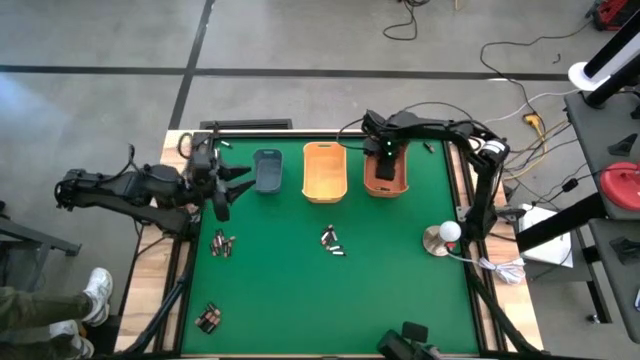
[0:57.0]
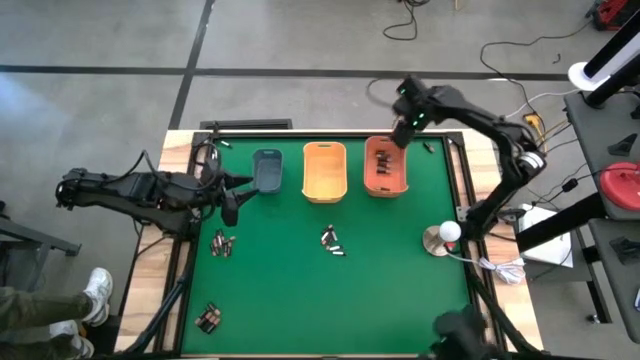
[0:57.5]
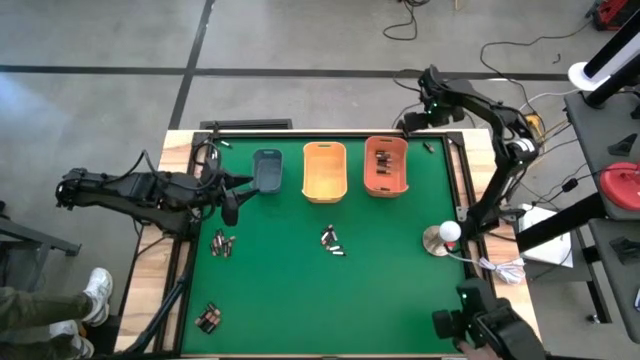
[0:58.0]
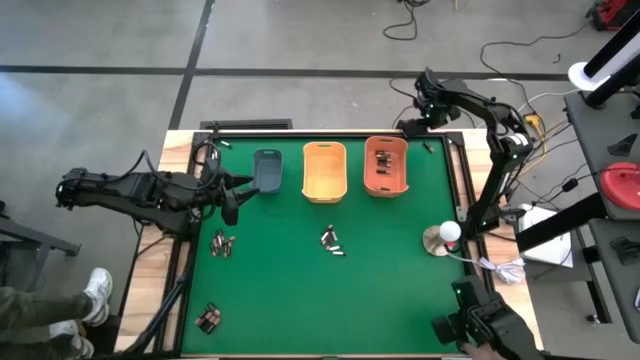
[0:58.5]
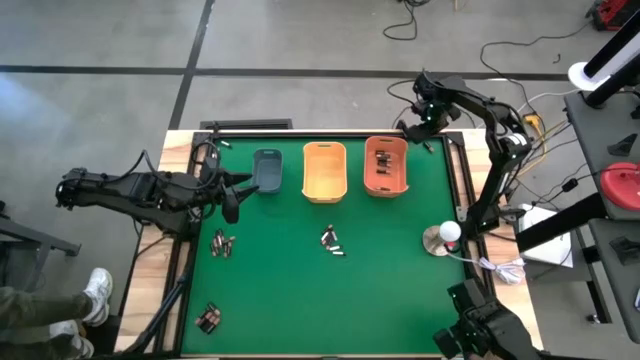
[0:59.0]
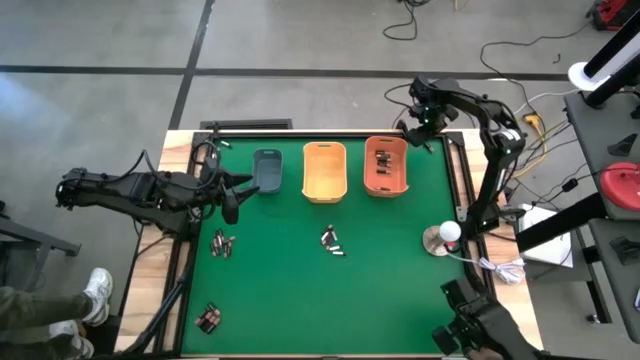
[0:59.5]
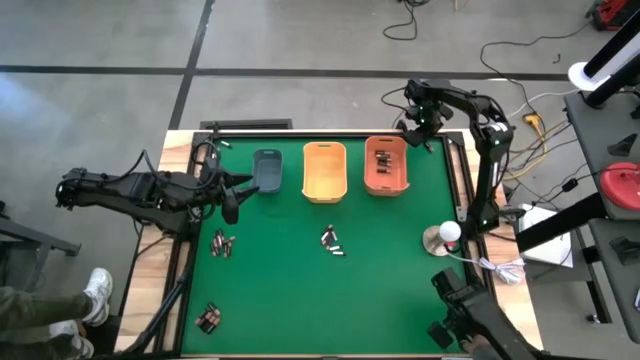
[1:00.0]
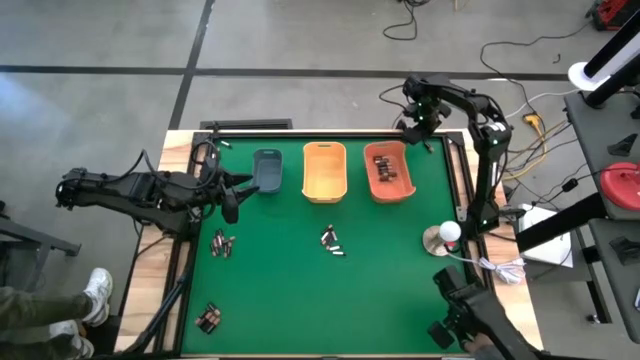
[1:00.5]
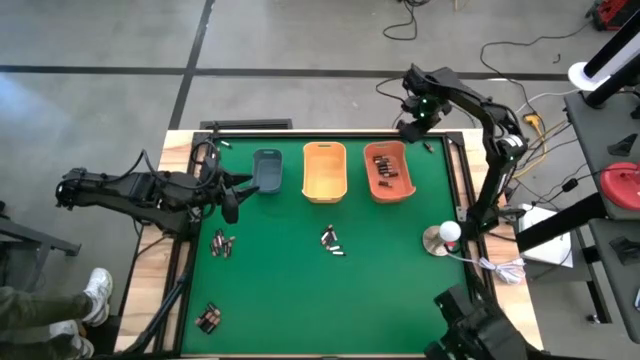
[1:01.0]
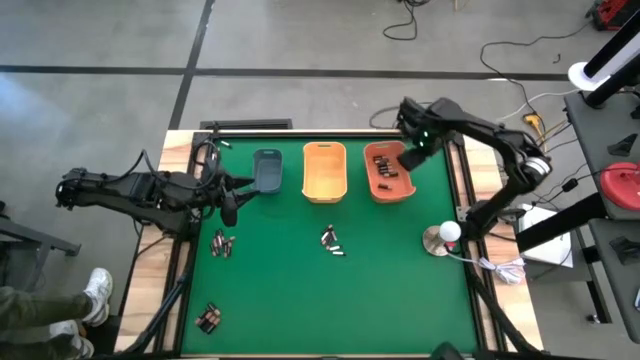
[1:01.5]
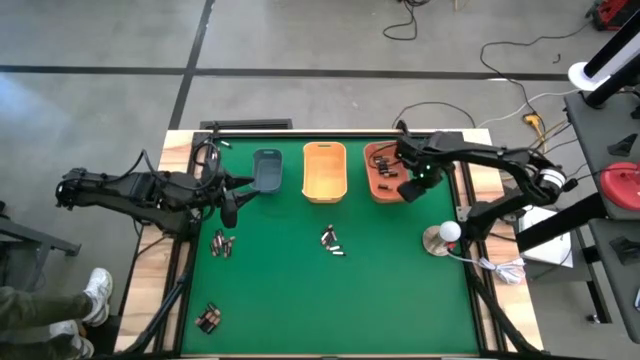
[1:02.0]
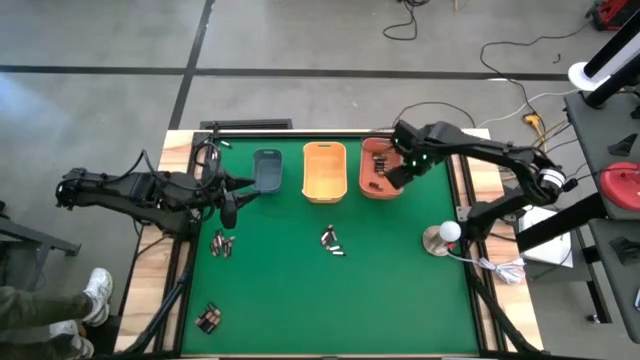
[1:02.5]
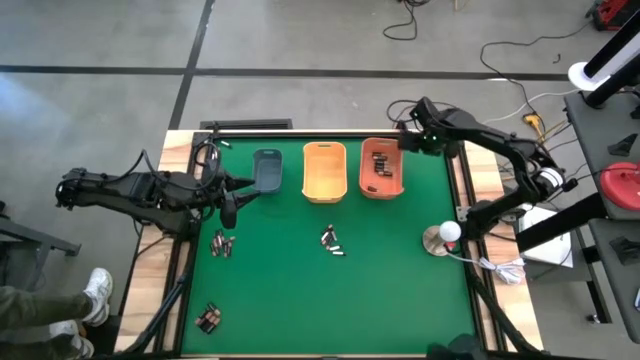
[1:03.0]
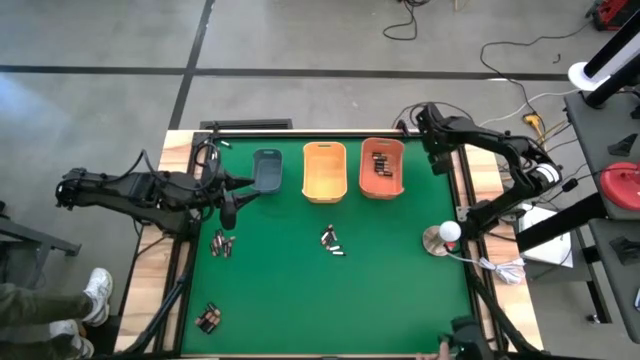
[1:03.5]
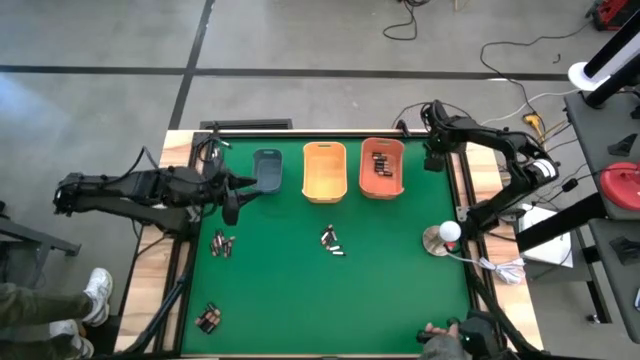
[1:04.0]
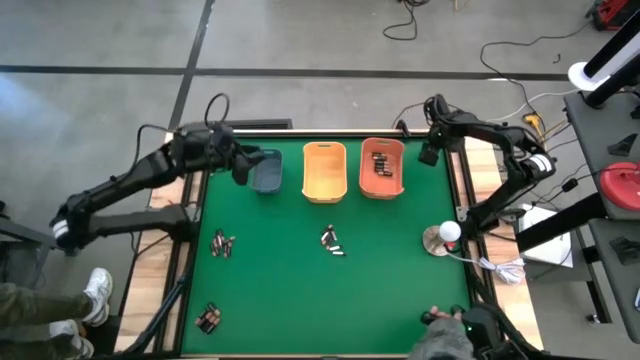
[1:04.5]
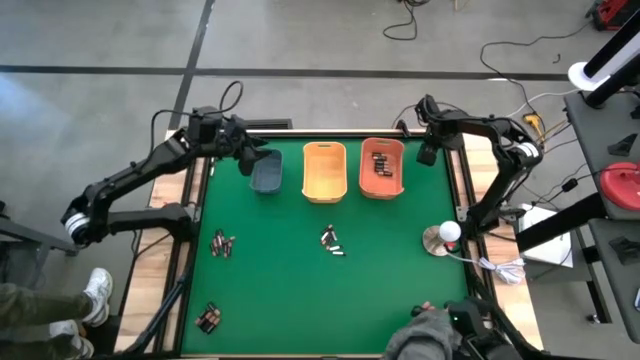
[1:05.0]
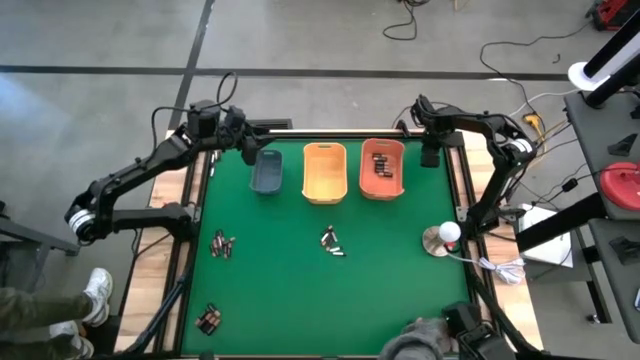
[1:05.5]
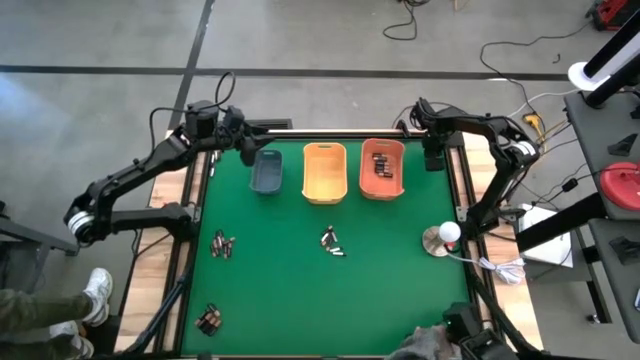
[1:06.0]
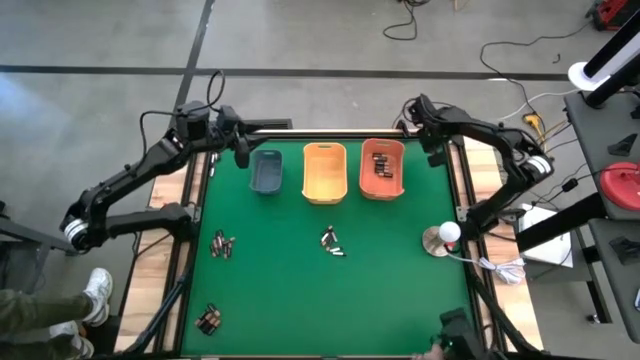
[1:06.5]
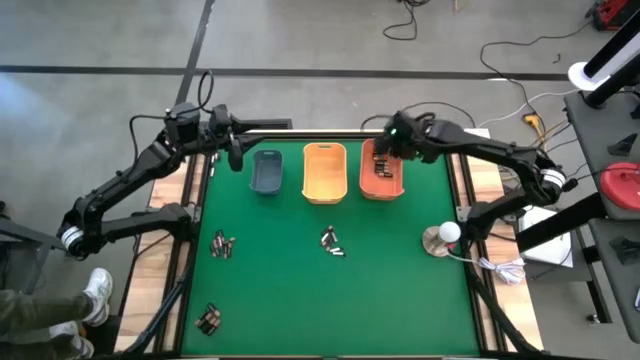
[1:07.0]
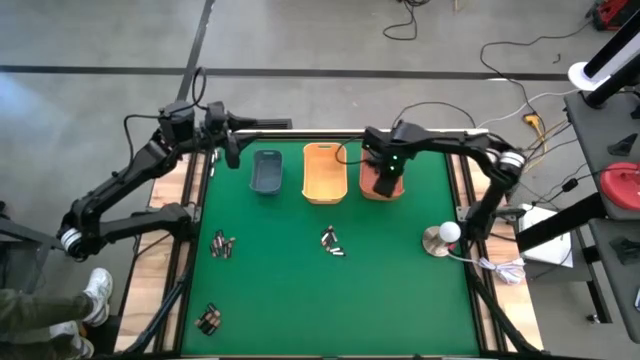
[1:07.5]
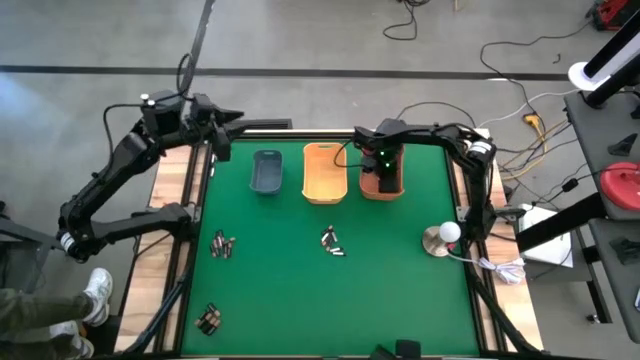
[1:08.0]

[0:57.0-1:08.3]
Task: Sort batteries
Put the black battery into the orange bin

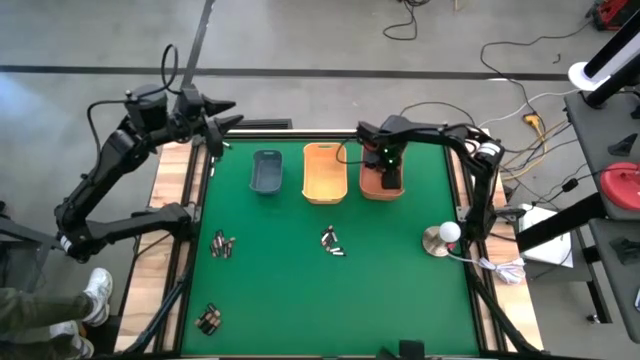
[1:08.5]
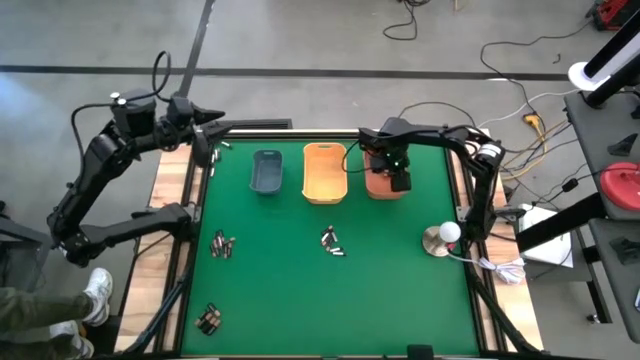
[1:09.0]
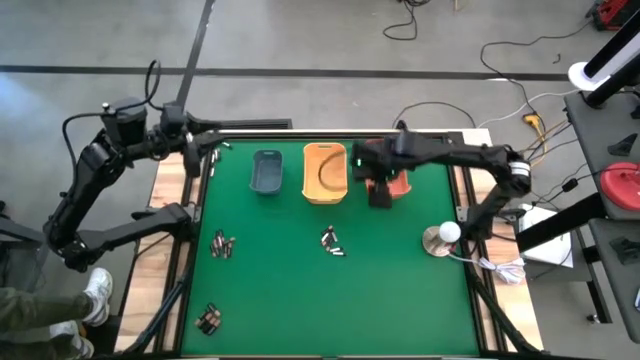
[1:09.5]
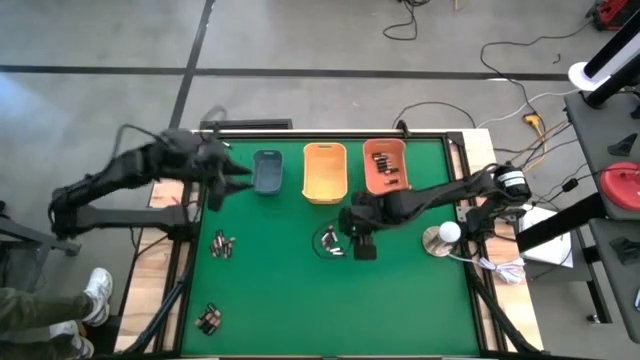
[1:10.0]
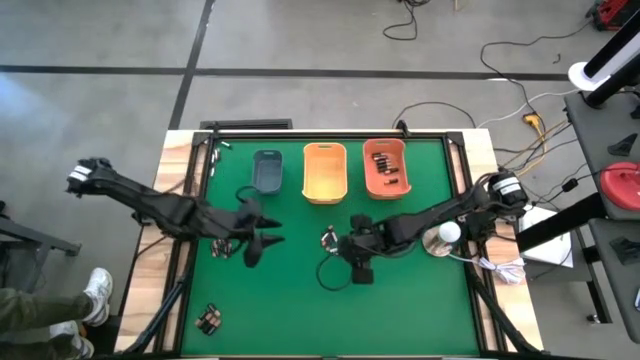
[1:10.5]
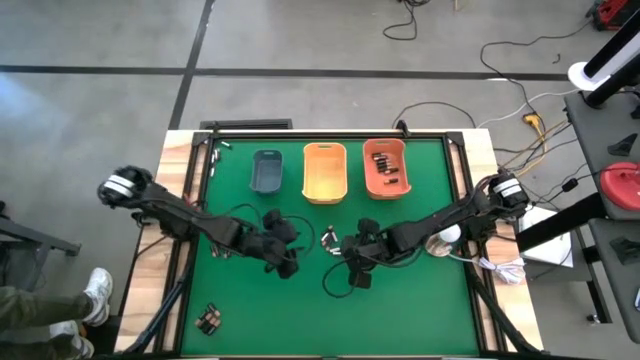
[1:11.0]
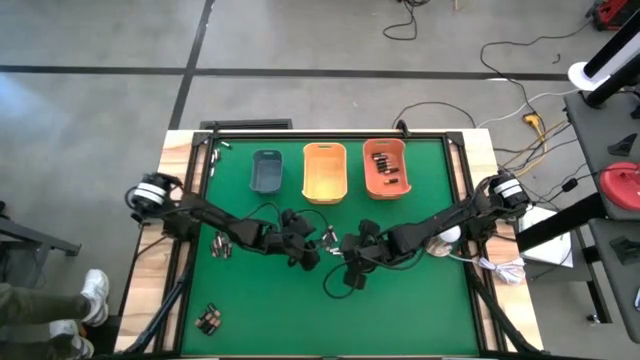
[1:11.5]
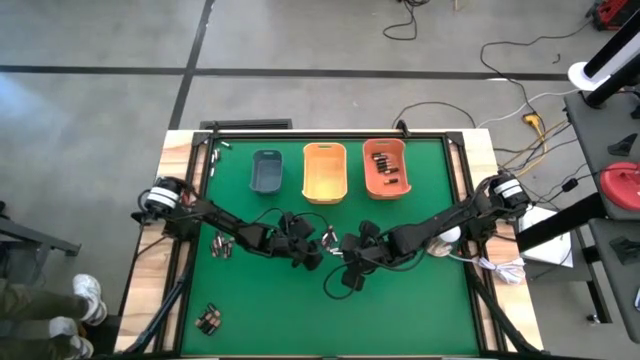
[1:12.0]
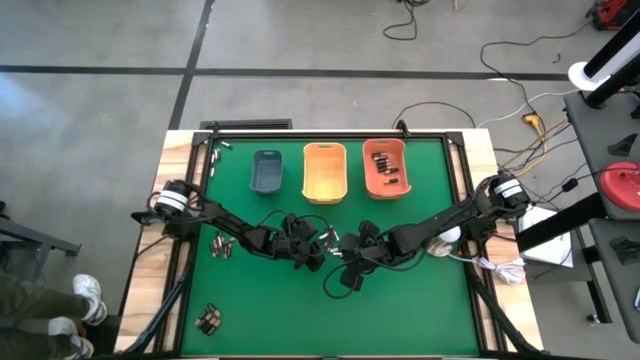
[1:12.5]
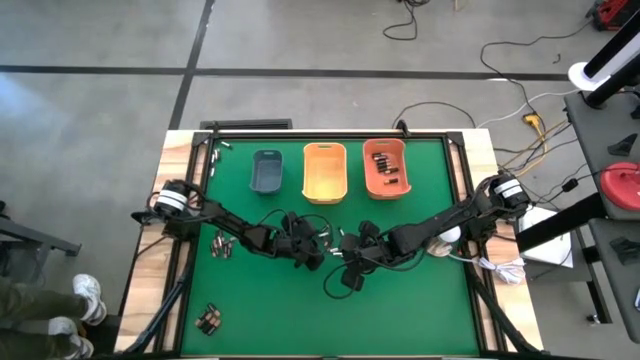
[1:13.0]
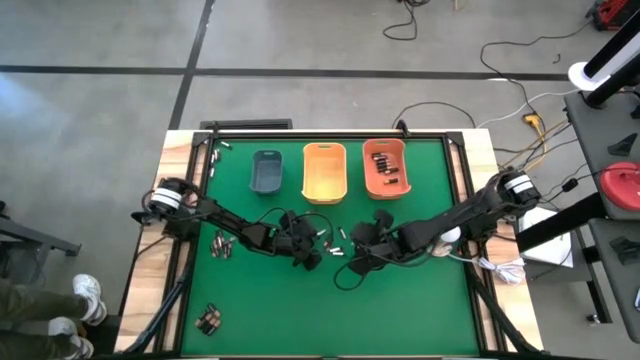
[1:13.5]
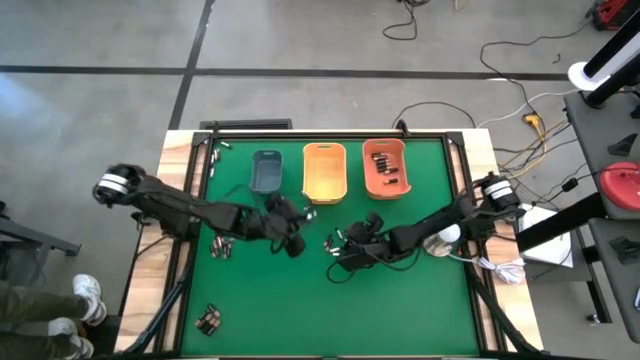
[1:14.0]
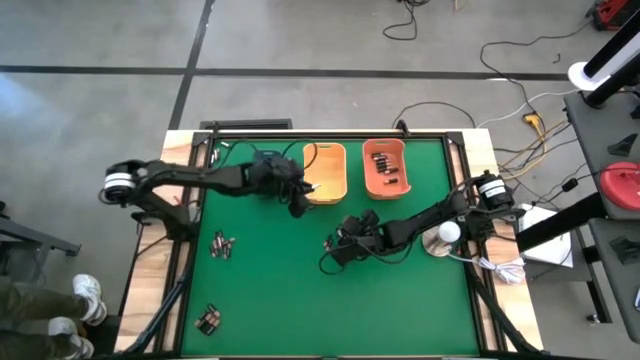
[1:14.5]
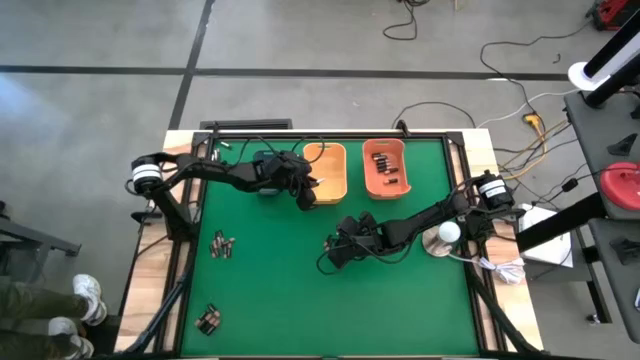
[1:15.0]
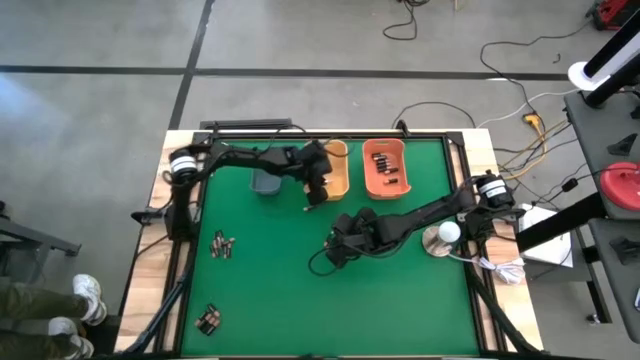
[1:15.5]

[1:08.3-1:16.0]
Put the silver battery into the yellow container

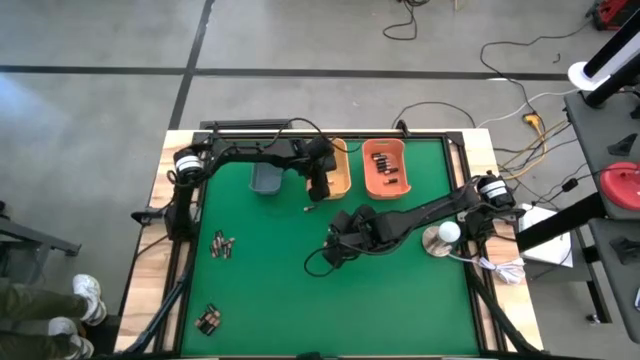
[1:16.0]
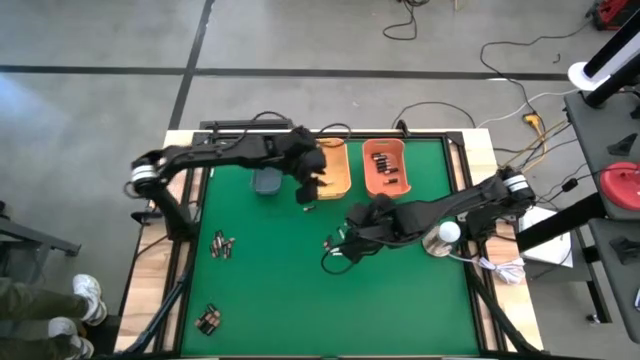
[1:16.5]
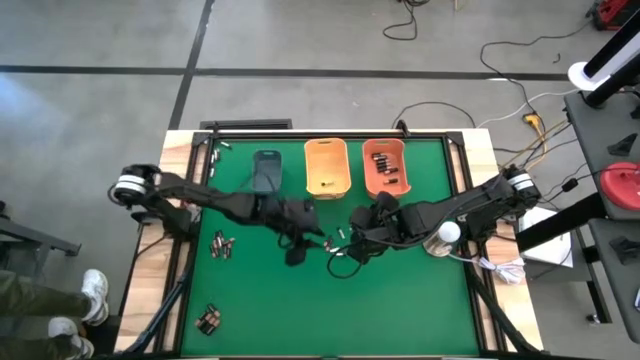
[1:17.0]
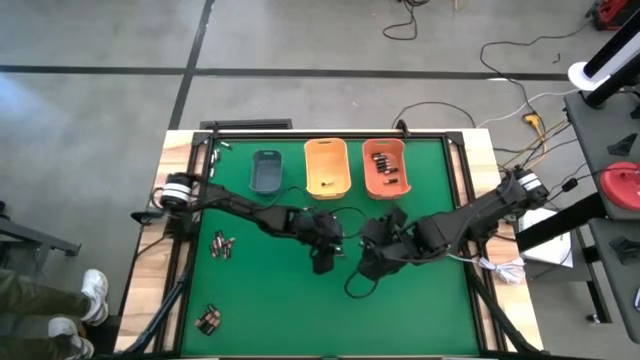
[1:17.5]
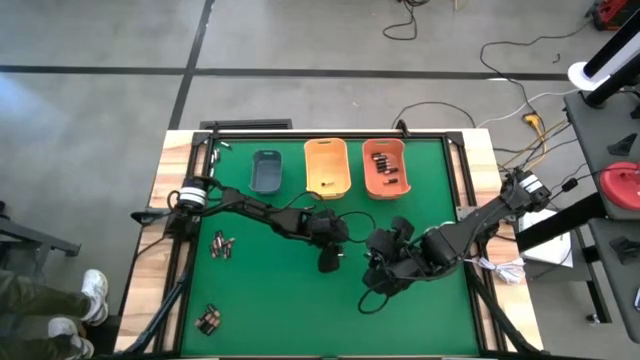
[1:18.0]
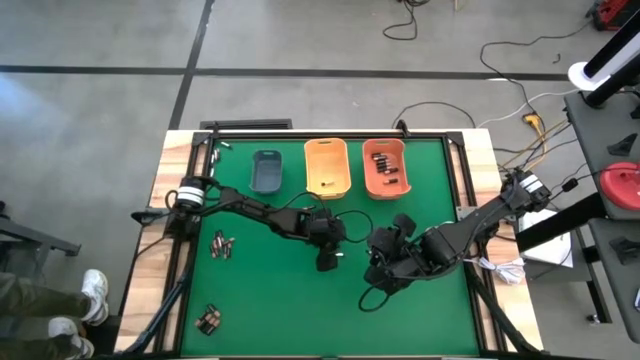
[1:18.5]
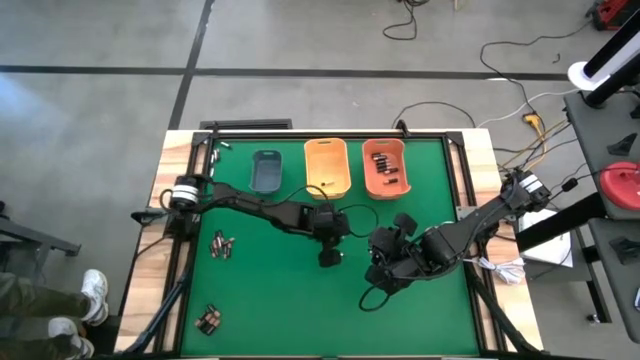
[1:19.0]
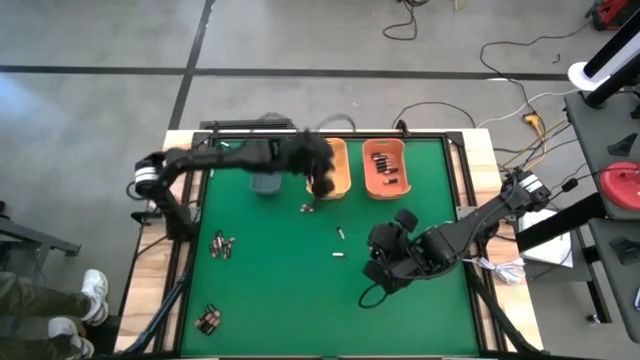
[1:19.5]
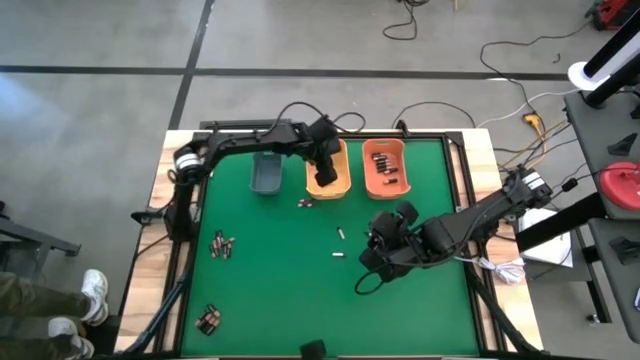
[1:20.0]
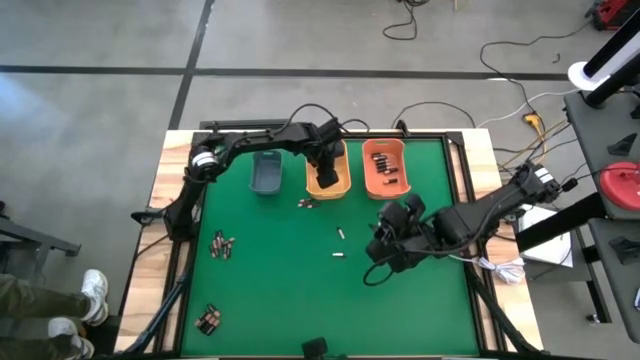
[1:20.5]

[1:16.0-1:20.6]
Put the silver battery into the yellow bin
